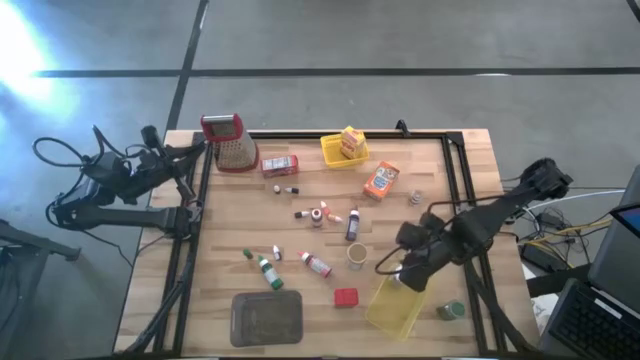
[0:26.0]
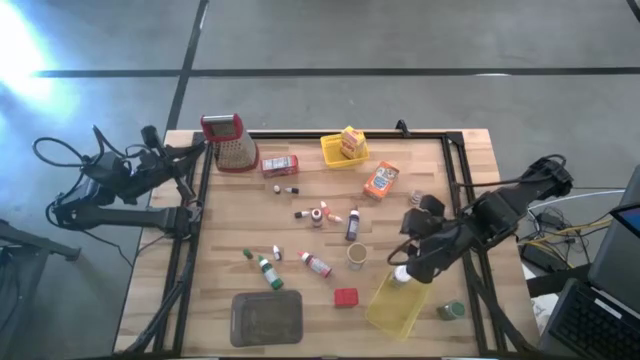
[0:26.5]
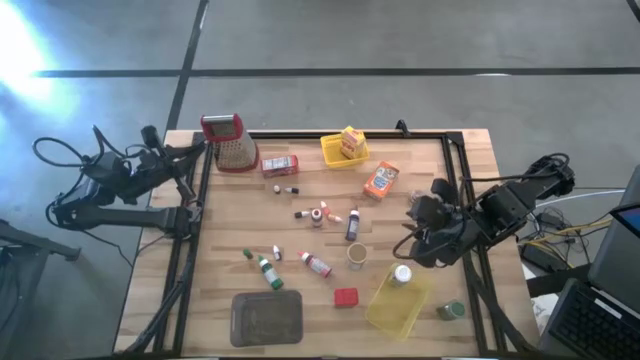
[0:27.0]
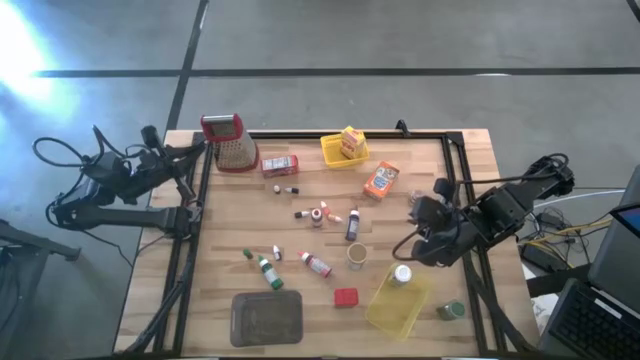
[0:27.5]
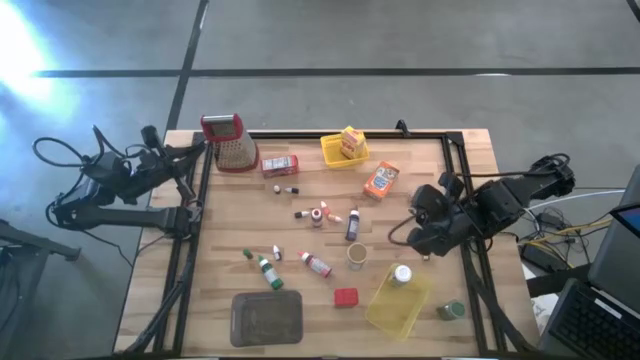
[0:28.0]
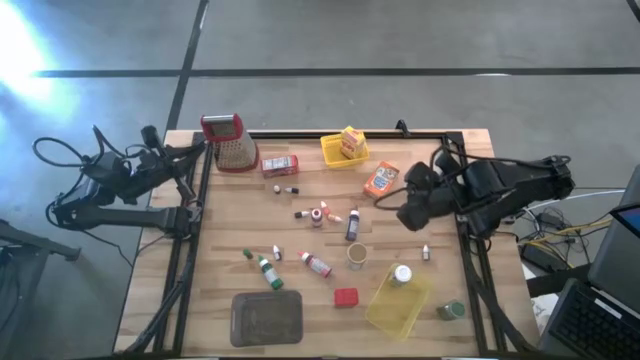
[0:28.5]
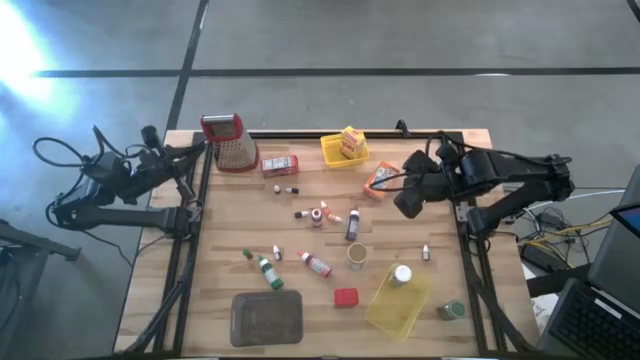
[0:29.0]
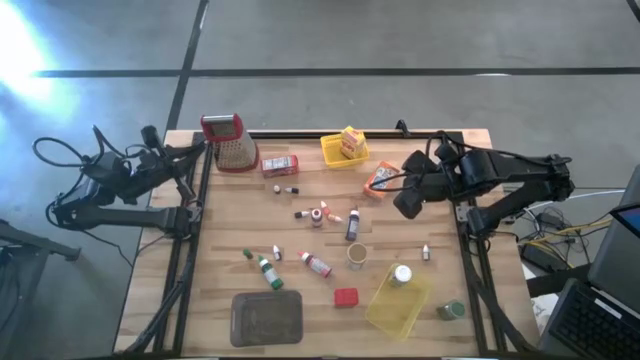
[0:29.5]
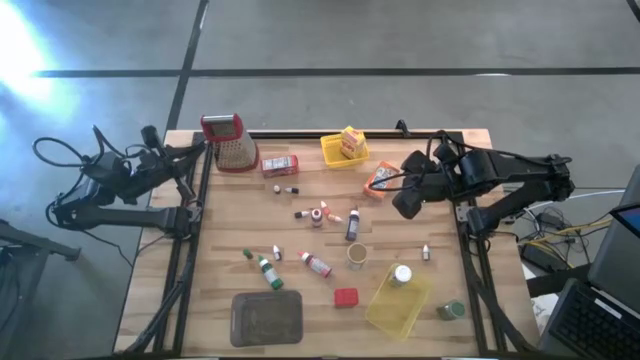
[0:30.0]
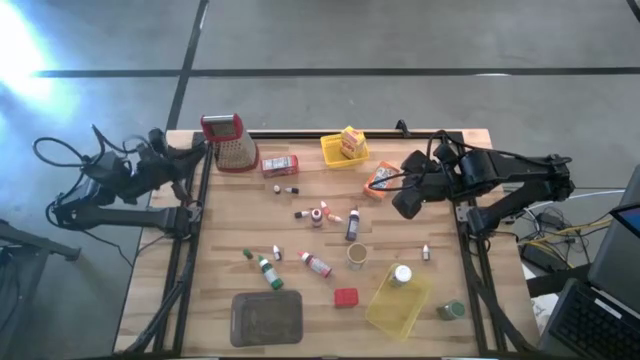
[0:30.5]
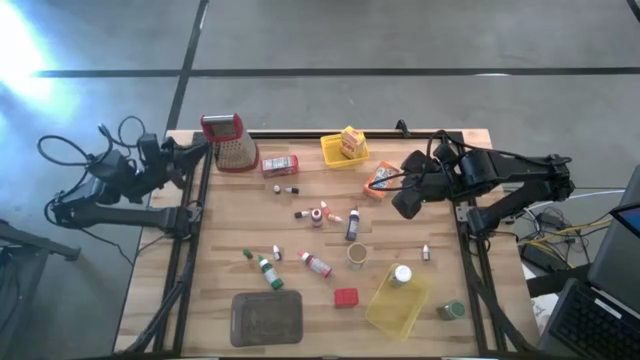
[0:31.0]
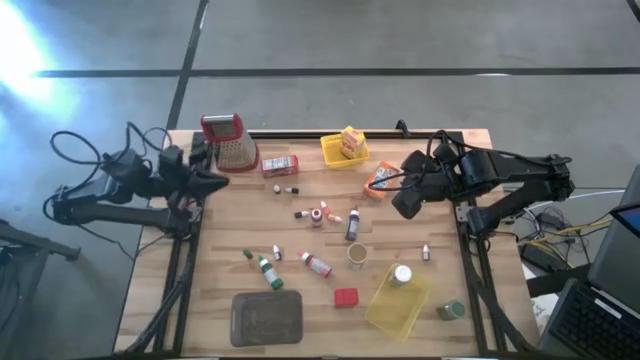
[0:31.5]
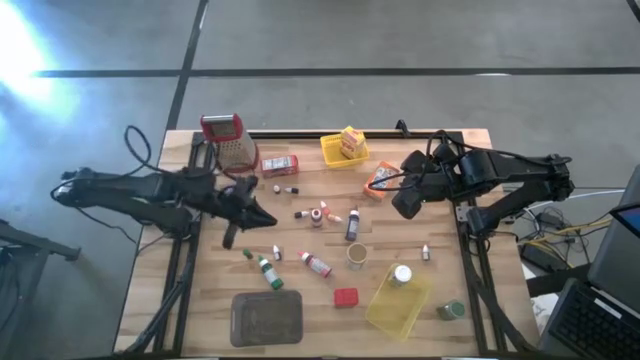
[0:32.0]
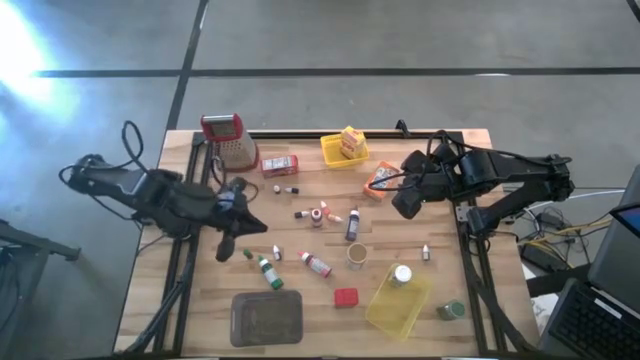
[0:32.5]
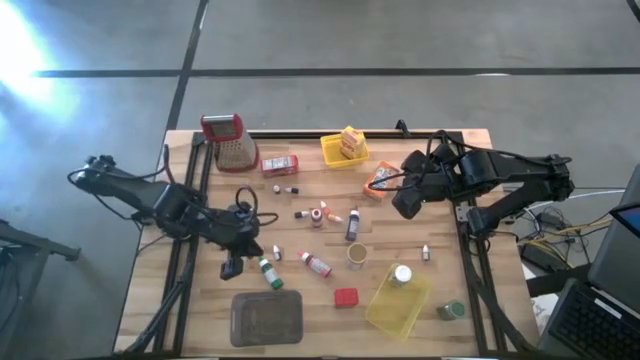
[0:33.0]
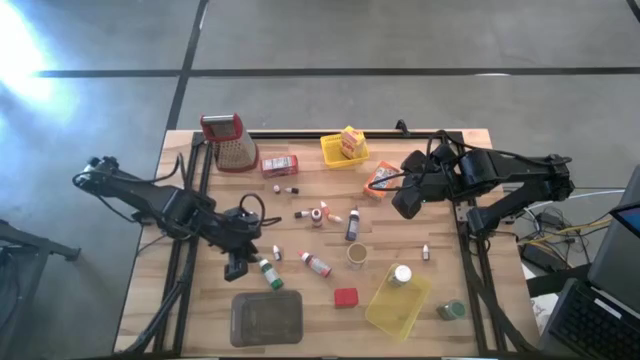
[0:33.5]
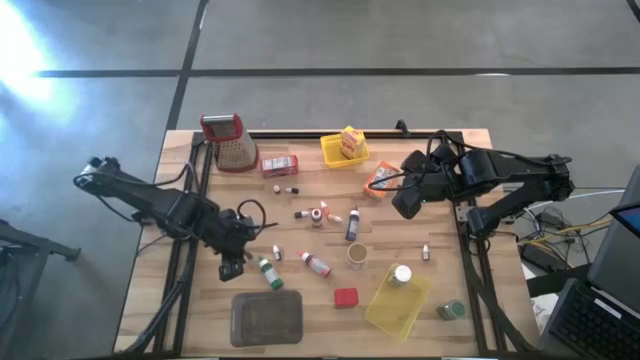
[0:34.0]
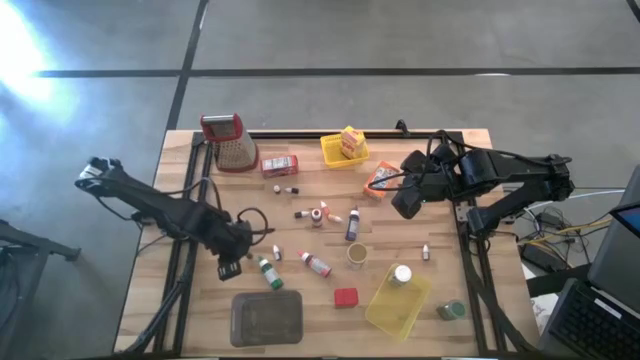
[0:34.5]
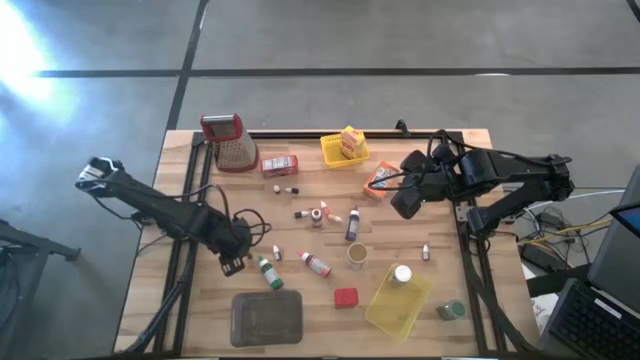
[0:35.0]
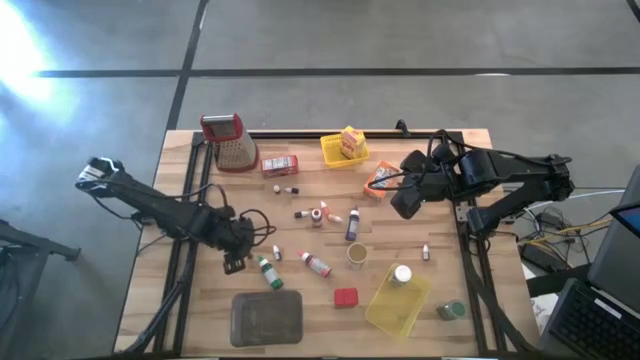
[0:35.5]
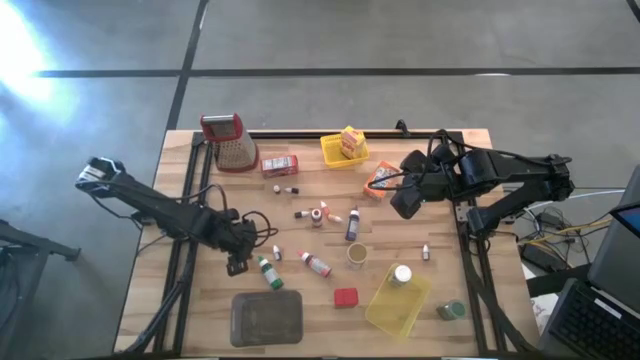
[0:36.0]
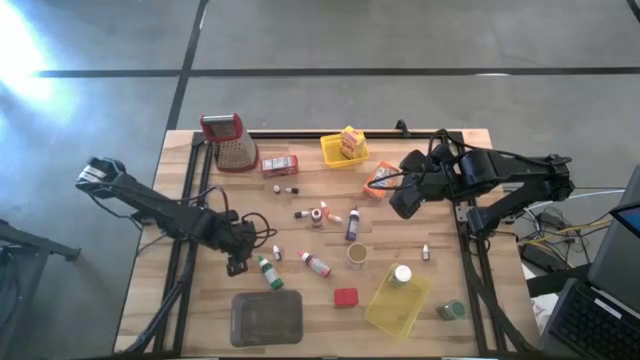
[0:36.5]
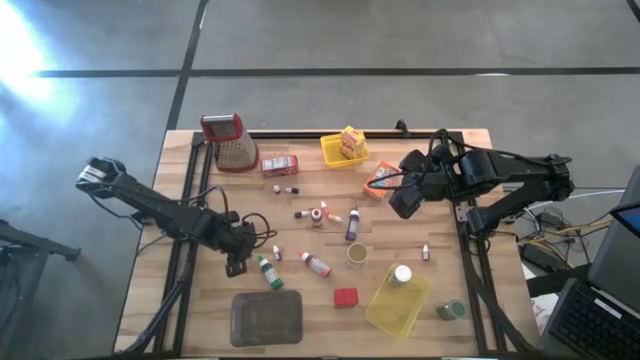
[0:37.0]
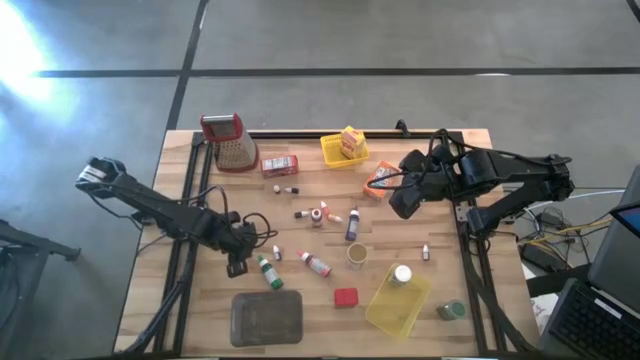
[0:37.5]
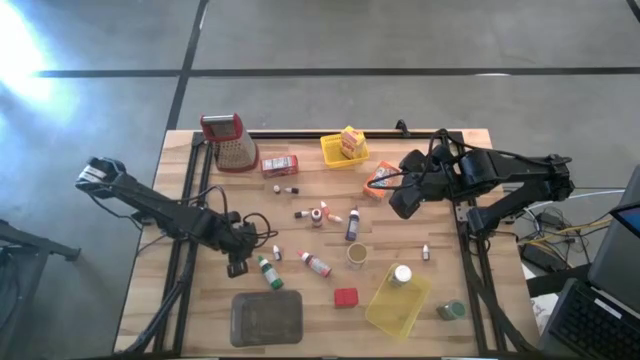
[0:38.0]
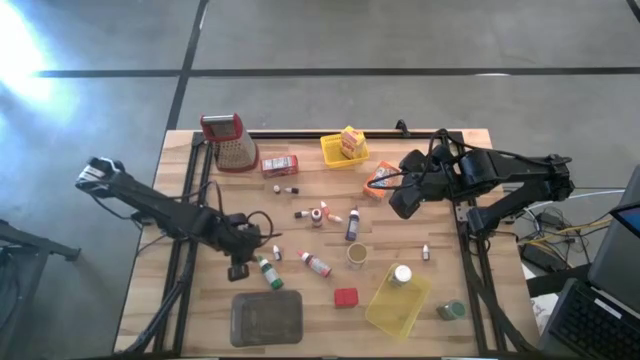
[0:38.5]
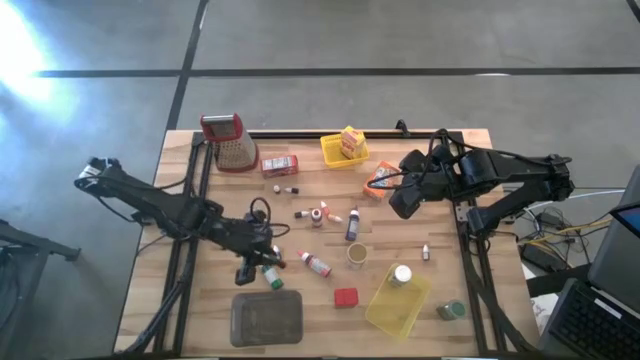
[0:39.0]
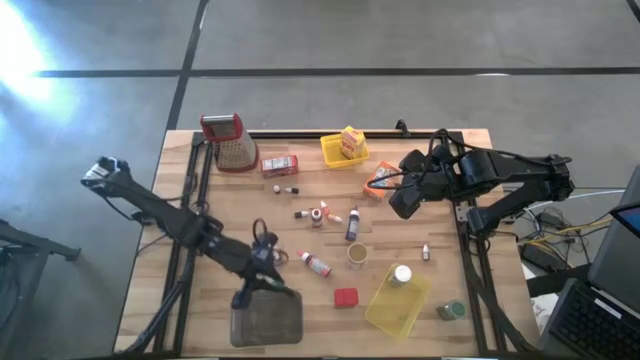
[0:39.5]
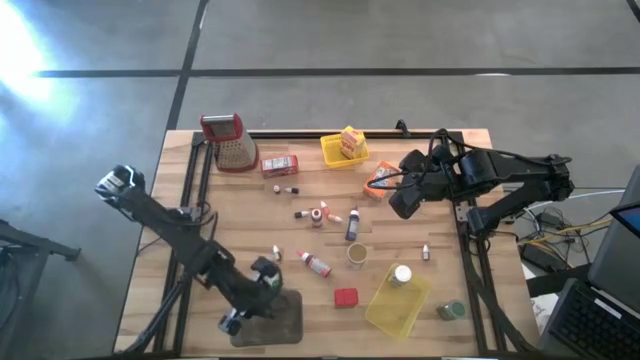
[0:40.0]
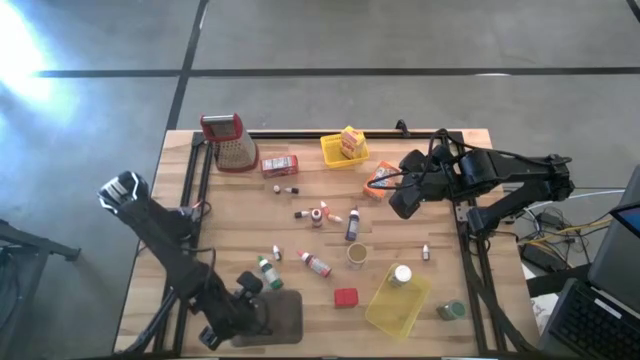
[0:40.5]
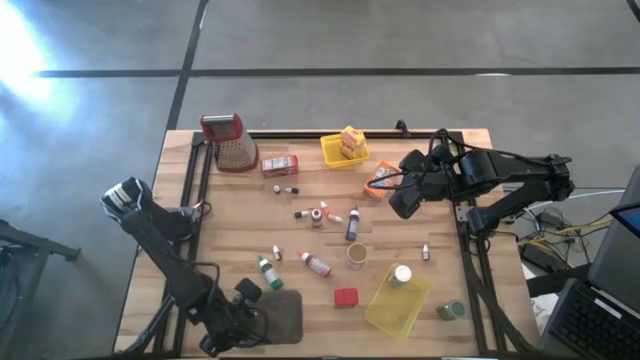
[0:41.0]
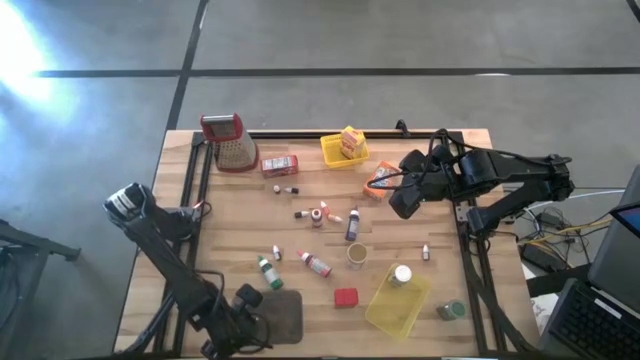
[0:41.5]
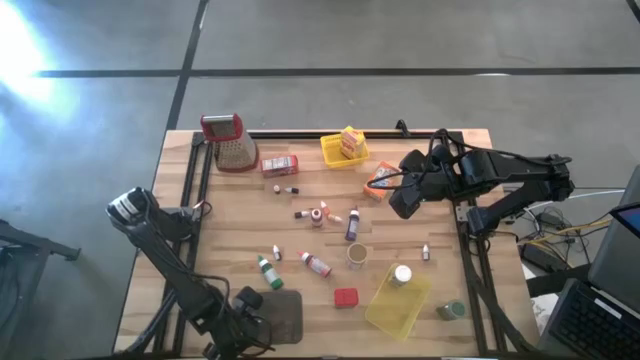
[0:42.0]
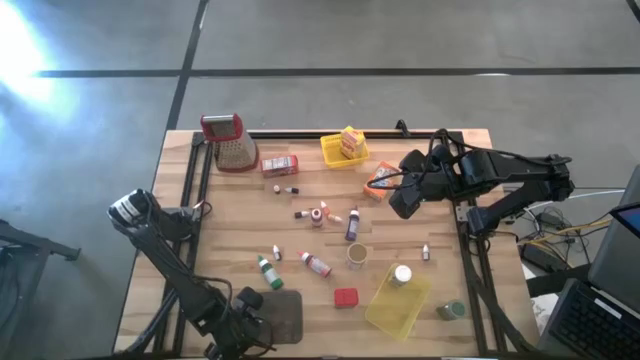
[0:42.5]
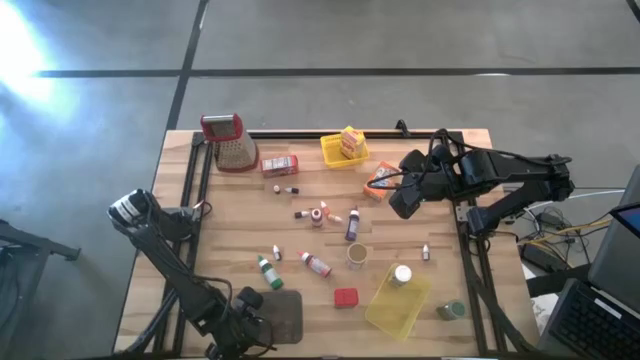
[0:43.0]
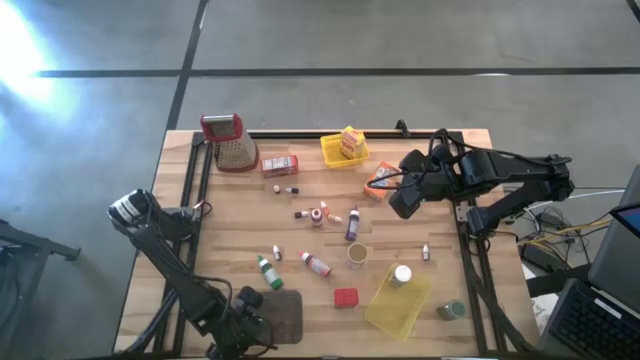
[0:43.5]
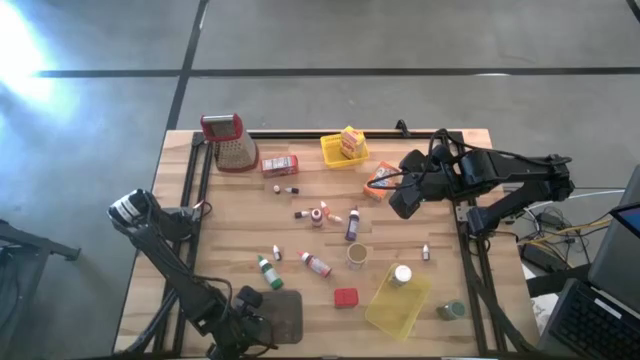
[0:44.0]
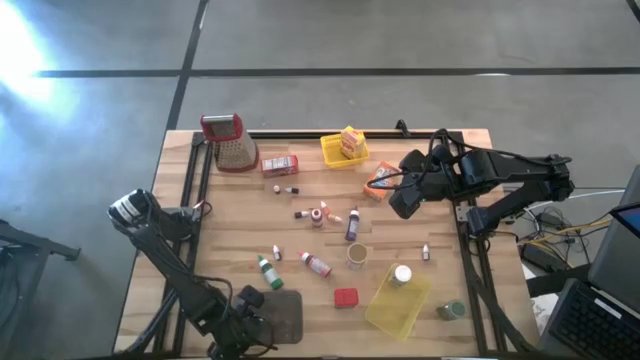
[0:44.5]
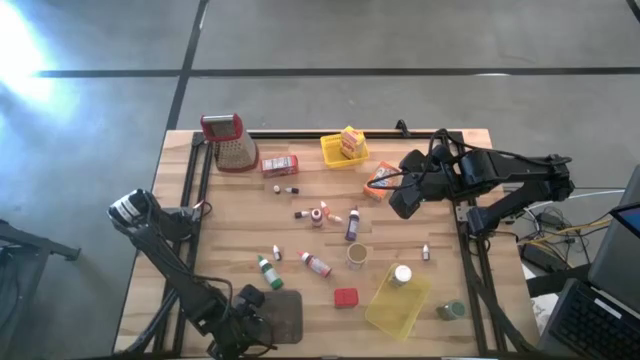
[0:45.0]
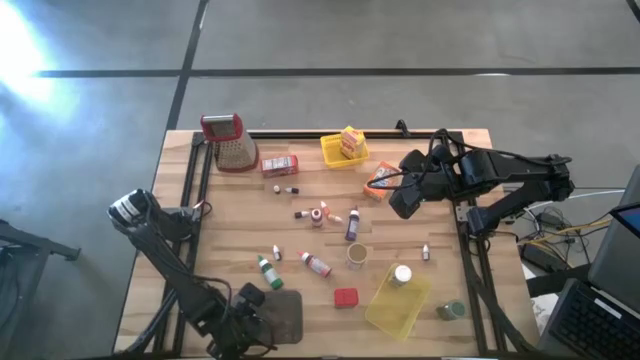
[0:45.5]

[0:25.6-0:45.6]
Task: Pick & Place Kitchen Items
Put the small green food coloring bottle into the black bin

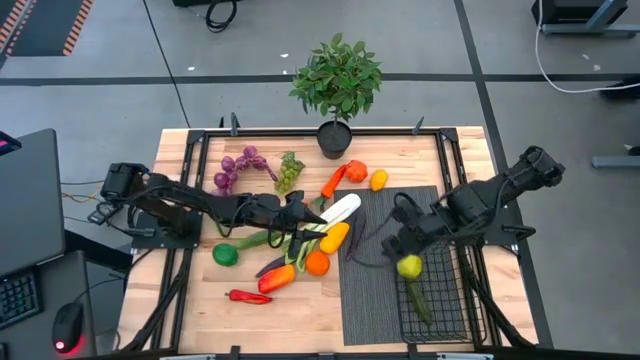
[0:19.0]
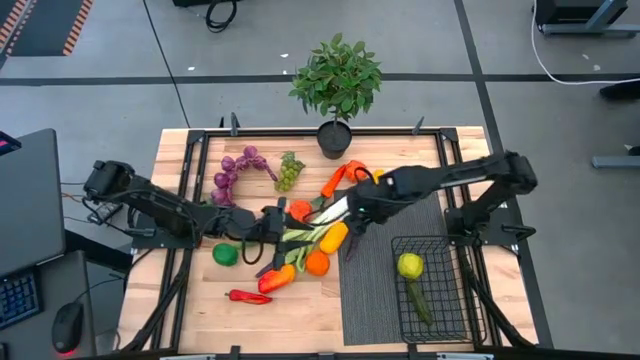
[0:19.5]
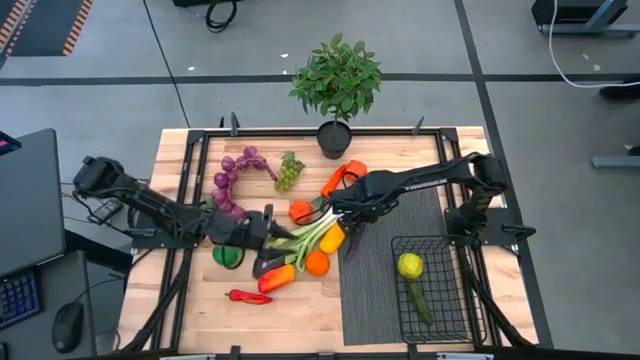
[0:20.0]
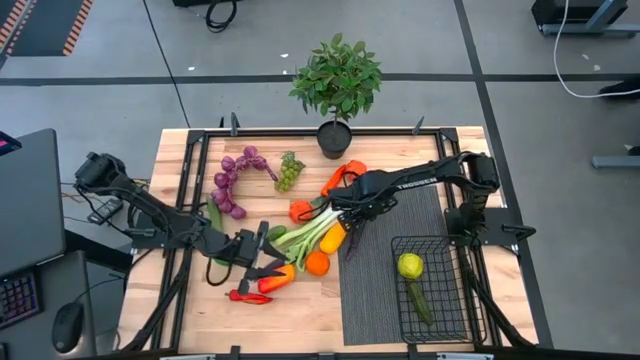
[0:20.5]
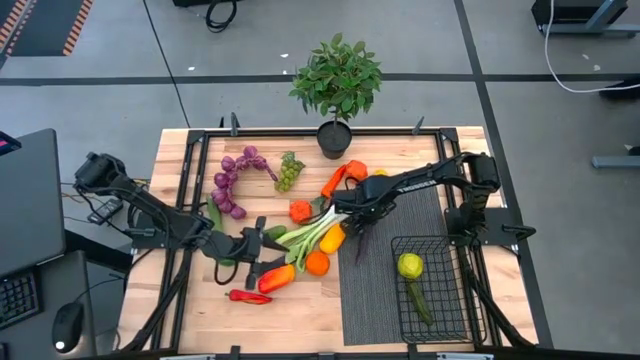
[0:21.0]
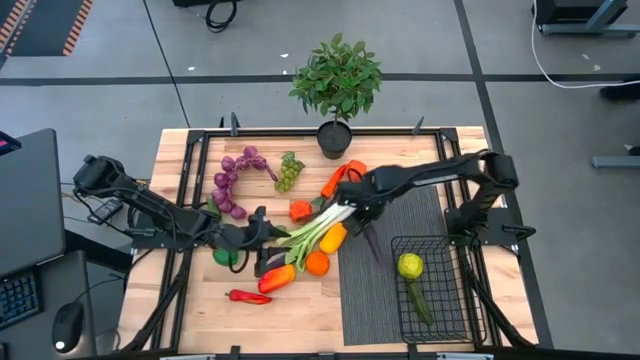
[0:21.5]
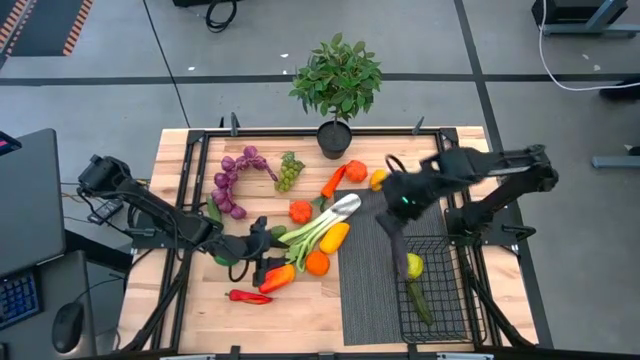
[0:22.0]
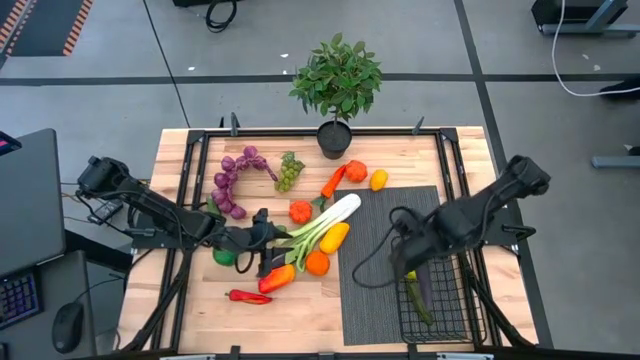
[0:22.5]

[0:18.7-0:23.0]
Task: Build produce basket
Put the right eggplant into the black wire basket
